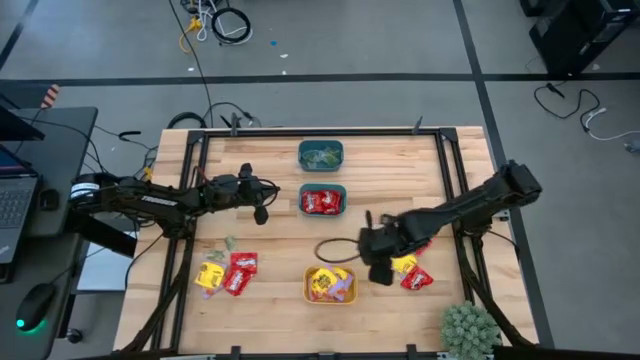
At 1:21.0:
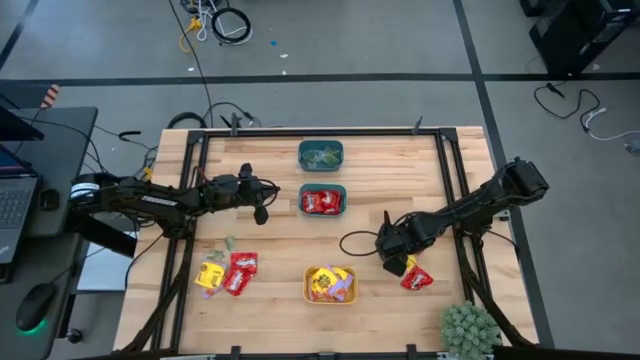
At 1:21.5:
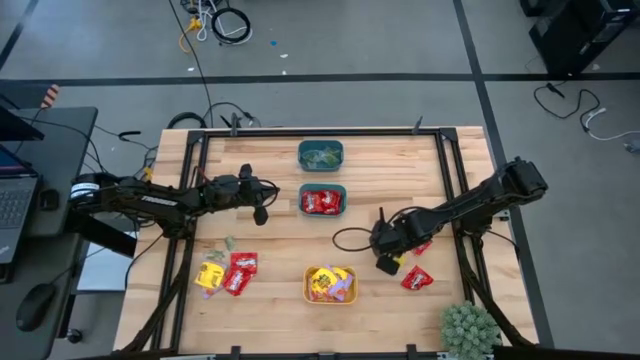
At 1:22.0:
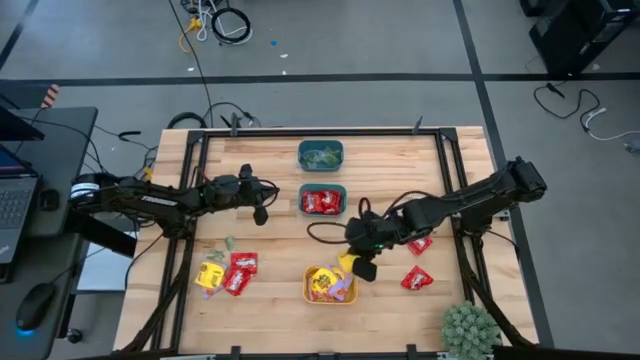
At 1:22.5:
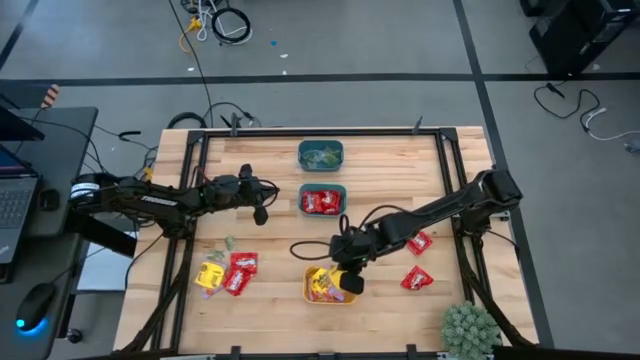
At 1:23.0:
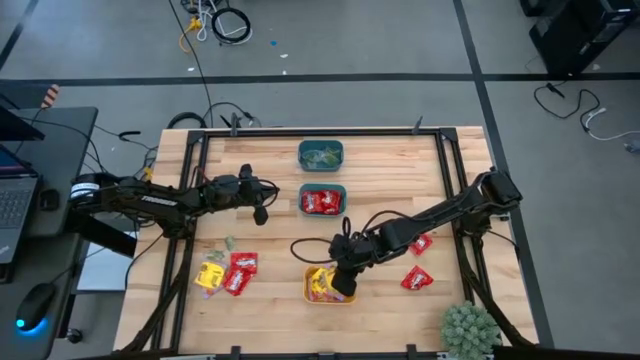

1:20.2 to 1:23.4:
Task: Sort candy
Put the yellow candy into the yellow bin

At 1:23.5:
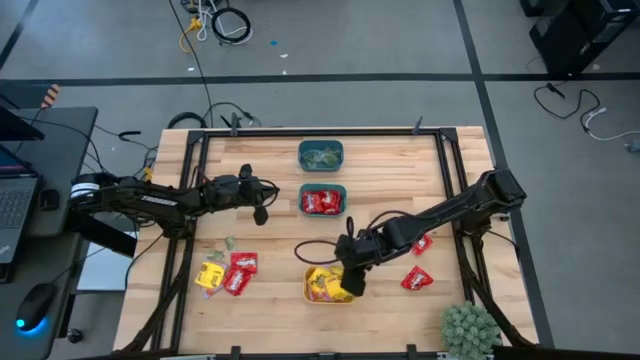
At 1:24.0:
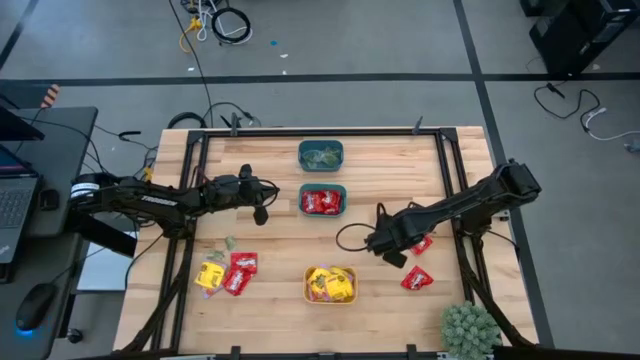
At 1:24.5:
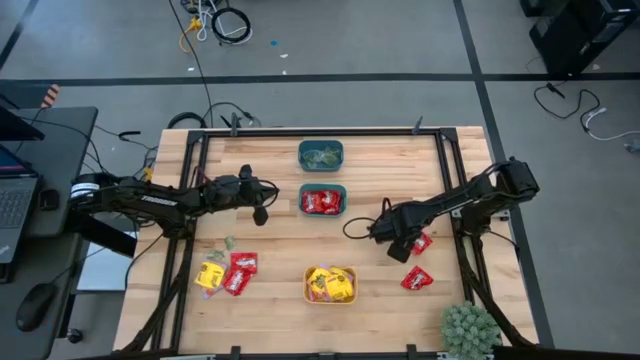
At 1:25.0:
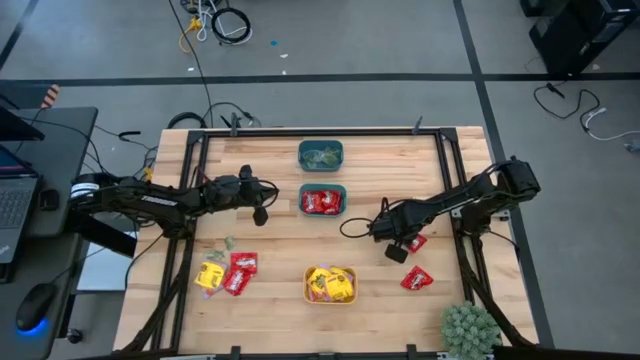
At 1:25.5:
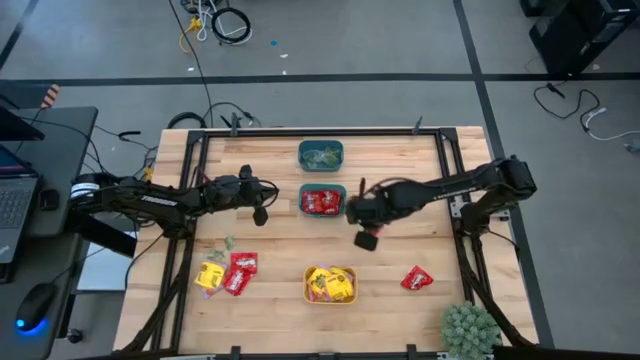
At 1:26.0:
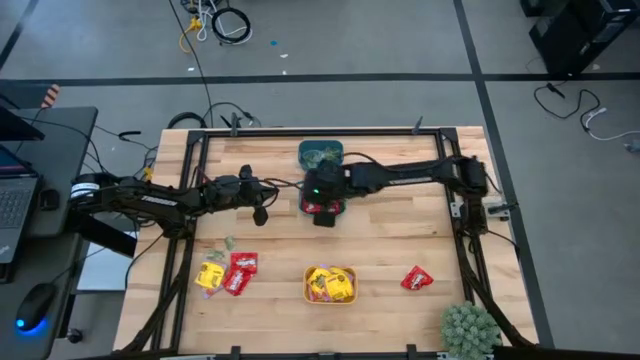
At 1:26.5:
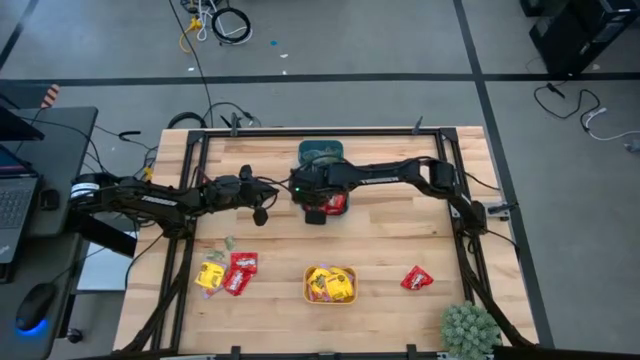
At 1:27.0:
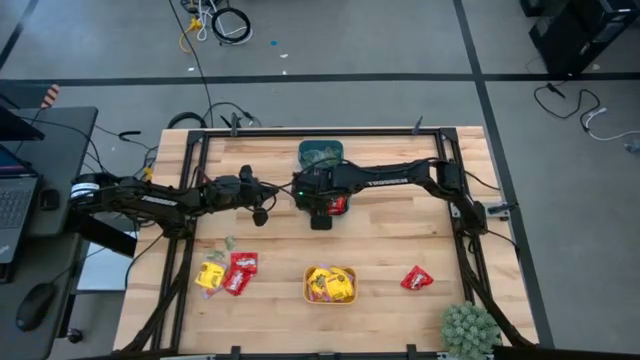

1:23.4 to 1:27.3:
Put the red candy into the green bin

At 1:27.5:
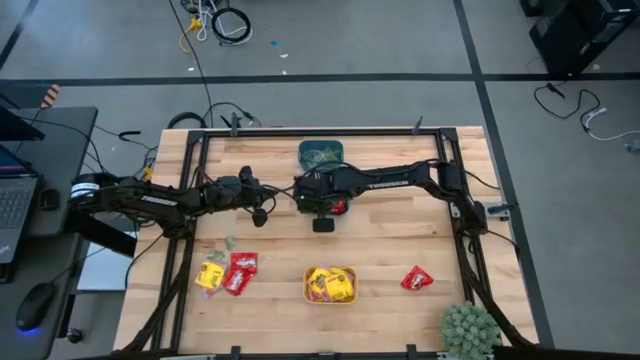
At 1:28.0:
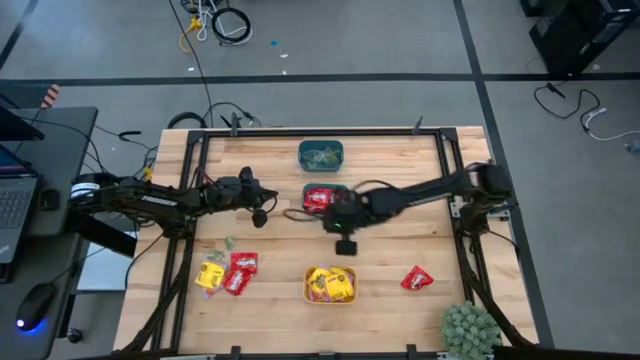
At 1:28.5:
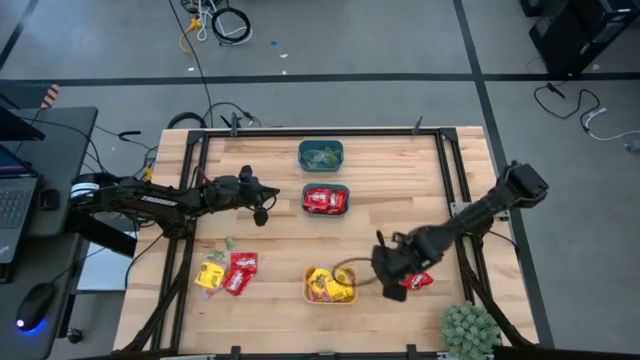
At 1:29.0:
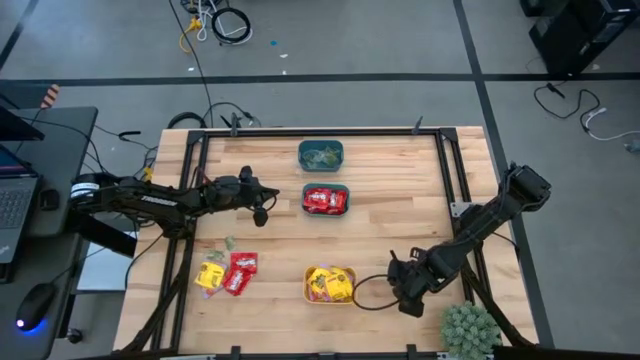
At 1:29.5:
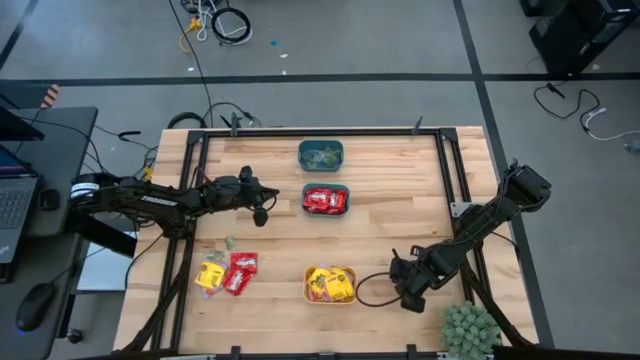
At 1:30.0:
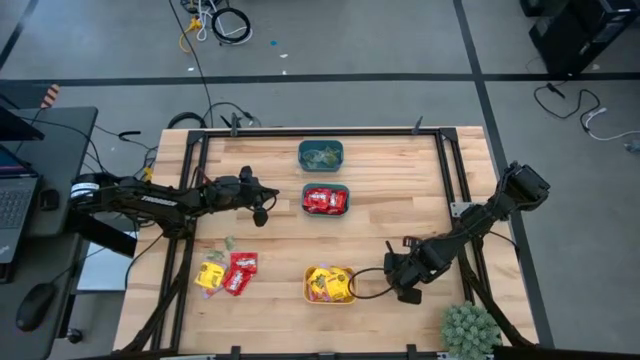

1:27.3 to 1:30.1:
Put the red candy into the green bin

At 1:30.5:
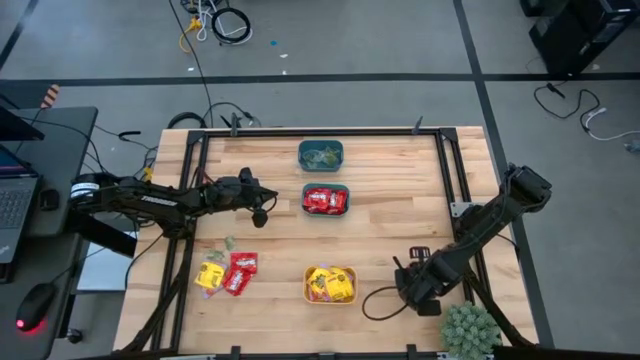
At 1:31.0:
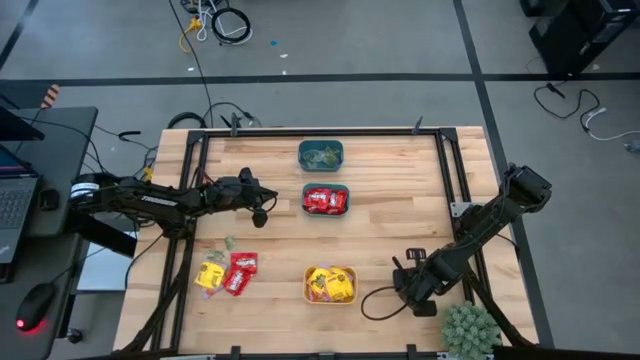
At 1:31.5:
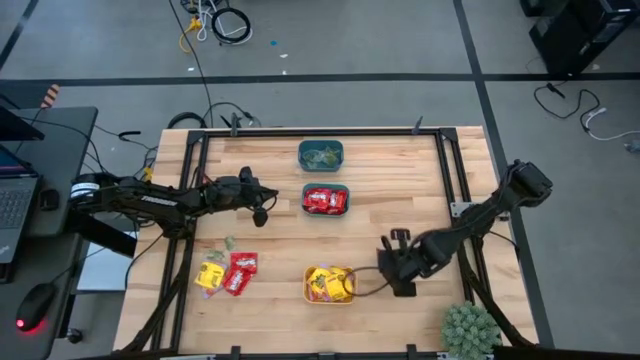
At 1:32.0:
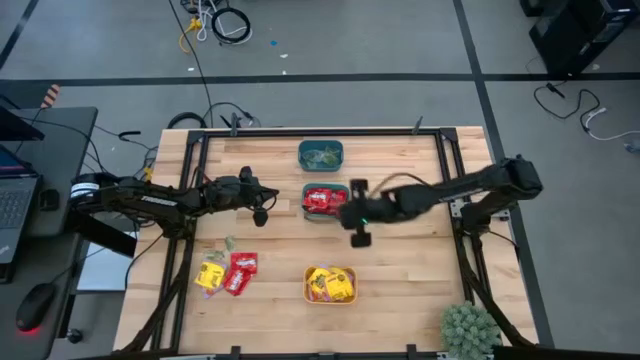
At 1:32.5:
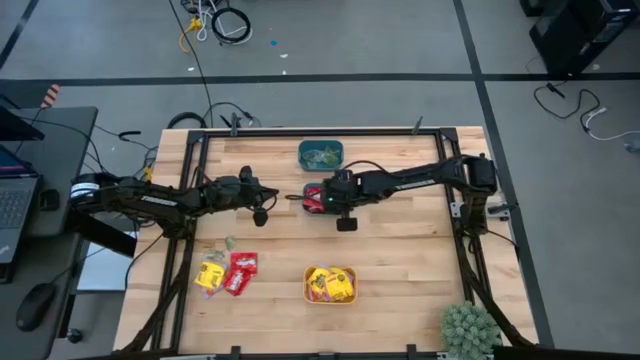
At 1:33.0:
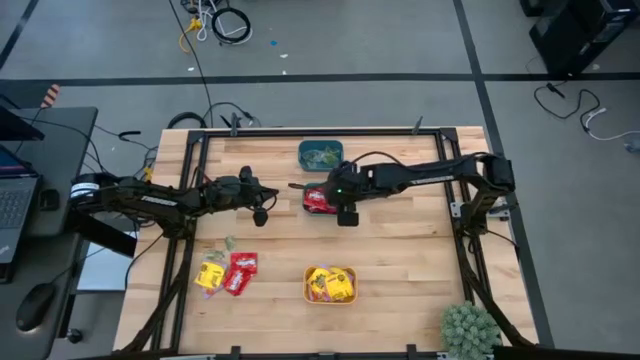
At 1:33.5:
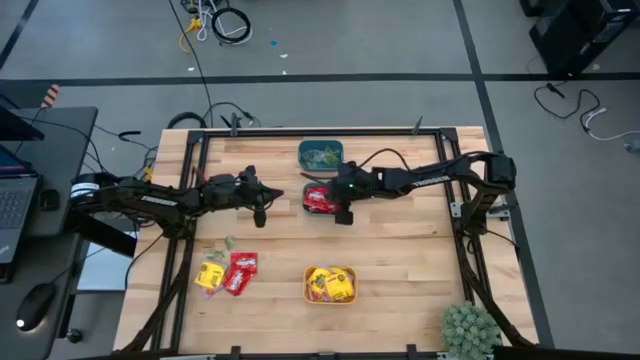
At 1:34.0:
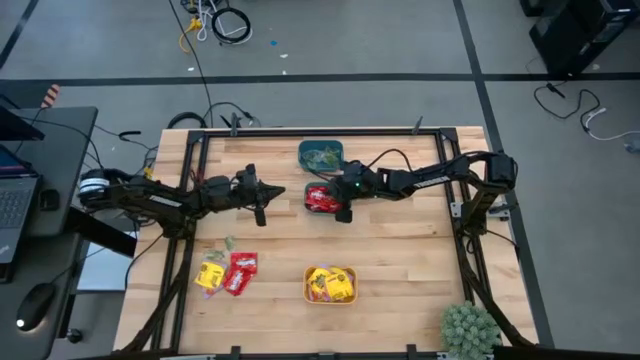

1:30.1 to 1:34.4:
Put the red candy into the green bin

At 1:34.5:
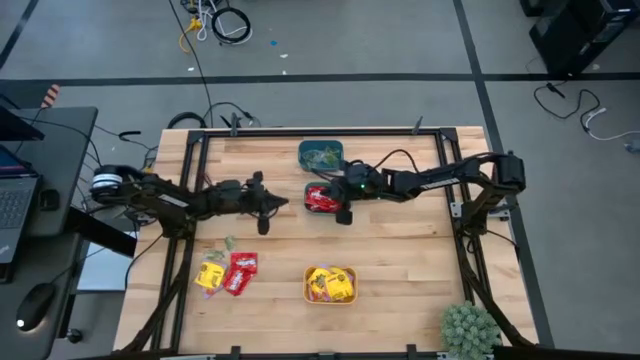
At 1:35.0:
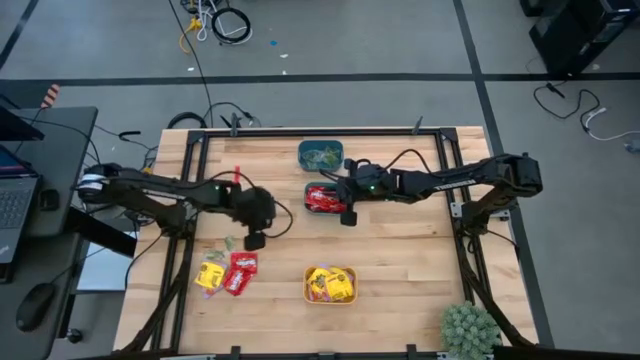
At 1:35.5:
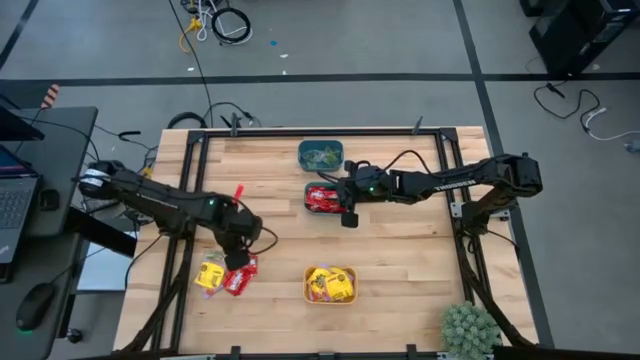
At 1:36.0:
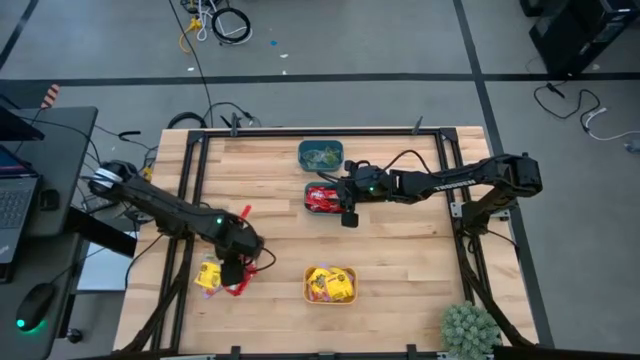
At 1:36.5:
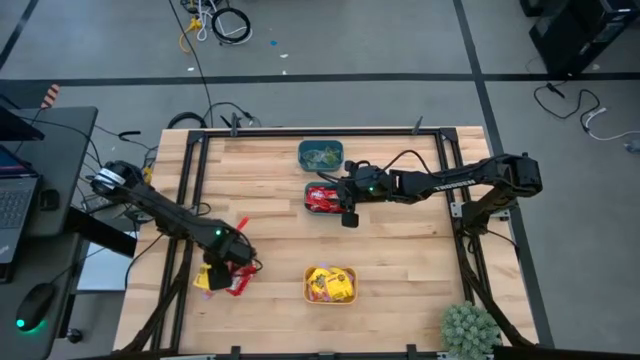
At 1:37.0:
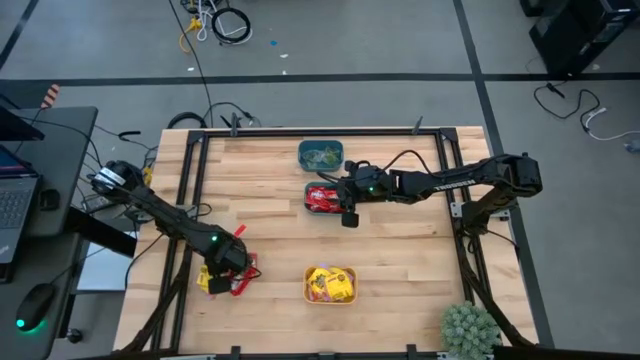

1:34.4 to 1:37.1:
Put the yellow candy into the yellow bin

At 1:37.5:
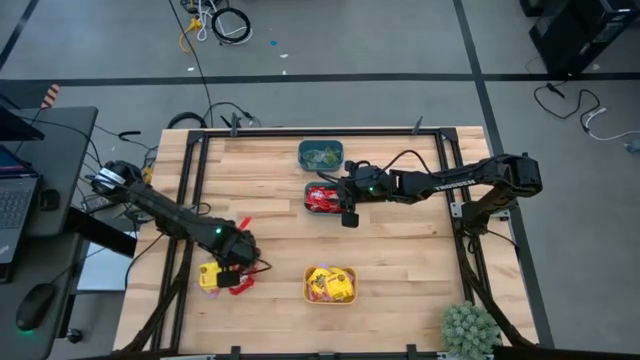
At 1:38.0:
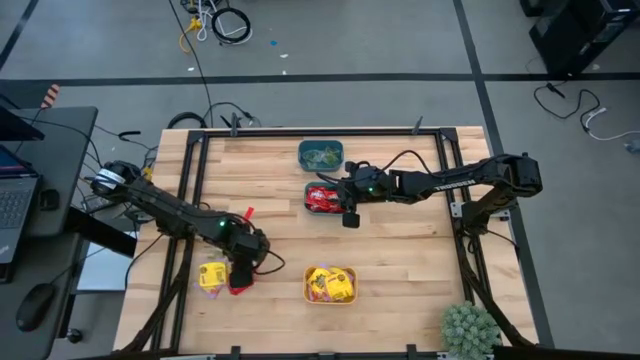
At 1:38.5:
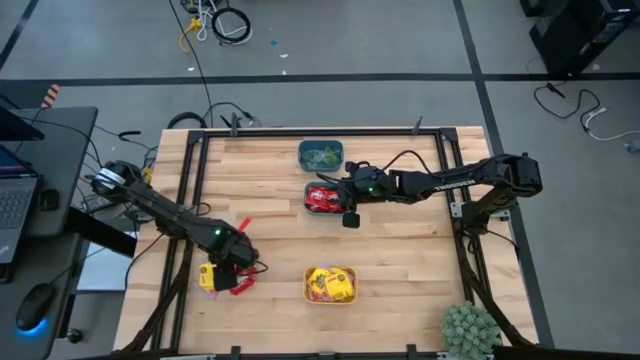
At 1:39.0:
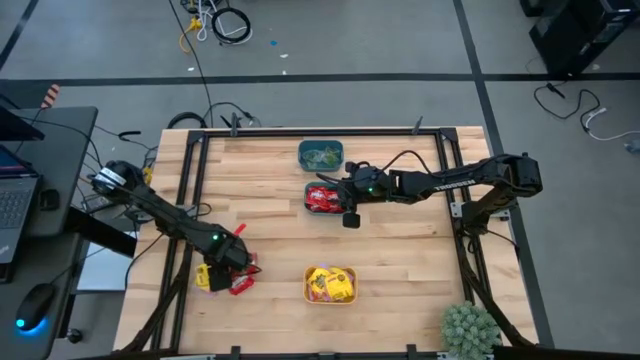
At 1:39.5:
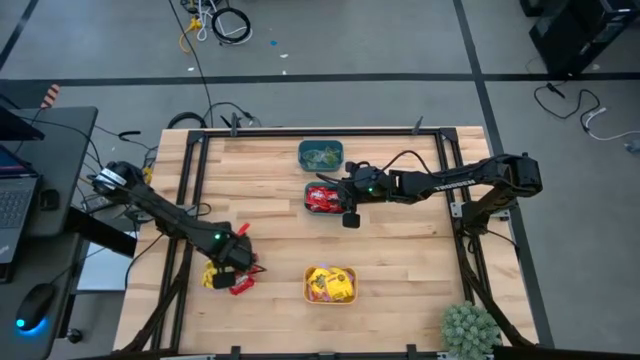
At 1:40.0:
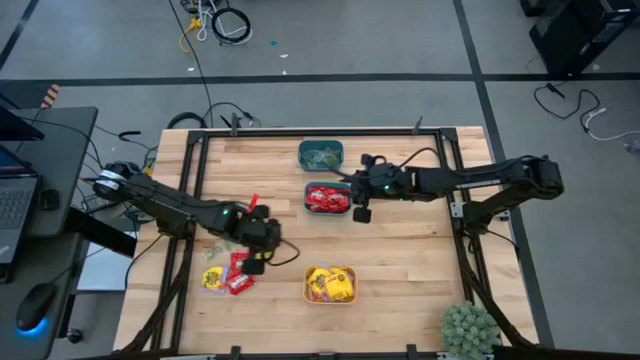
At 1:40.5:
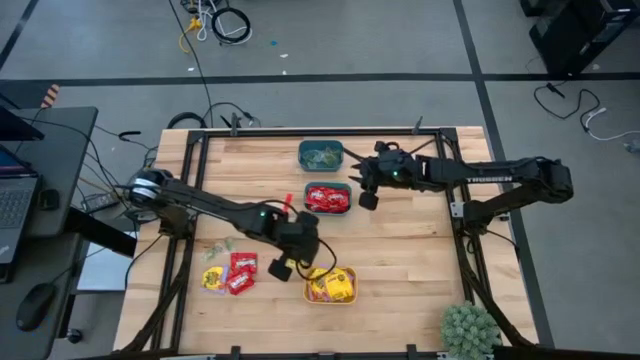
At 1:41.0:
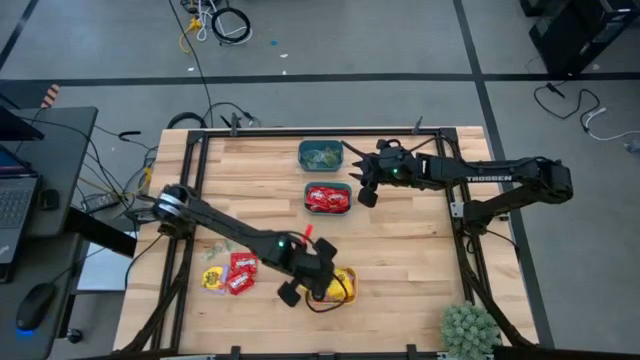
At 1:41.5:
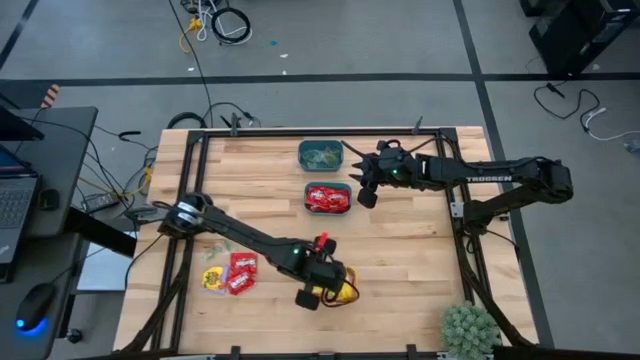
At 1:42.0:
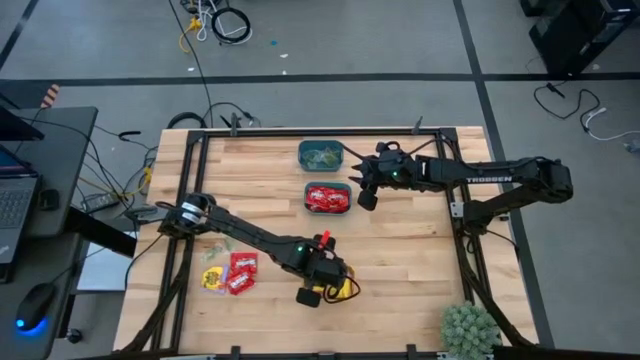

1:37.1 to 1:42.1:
Put the yellow candy into the yellow bin
